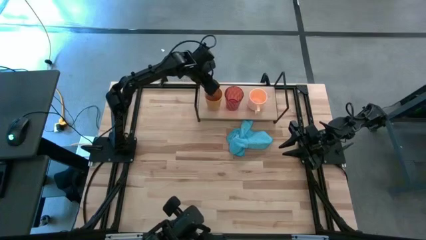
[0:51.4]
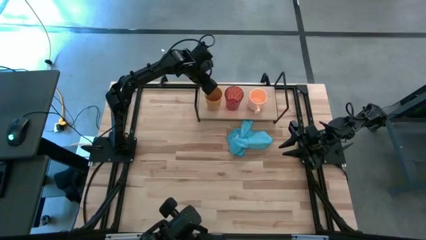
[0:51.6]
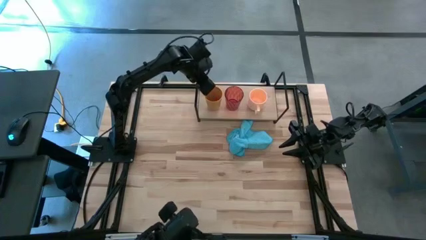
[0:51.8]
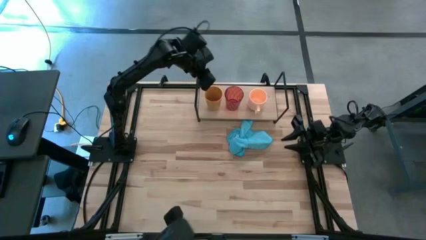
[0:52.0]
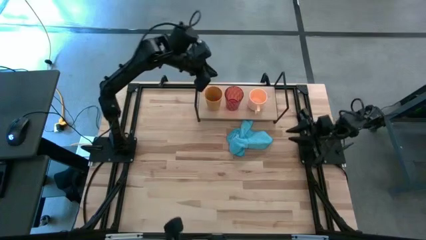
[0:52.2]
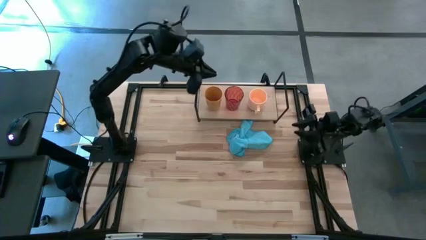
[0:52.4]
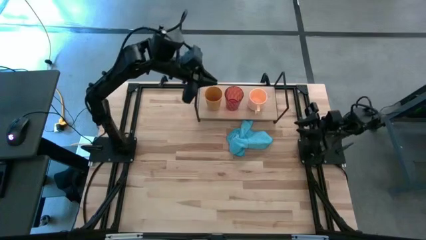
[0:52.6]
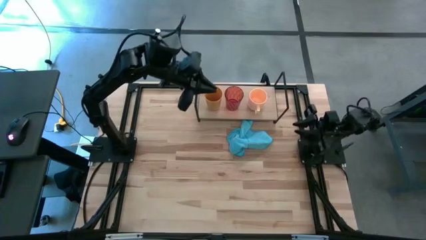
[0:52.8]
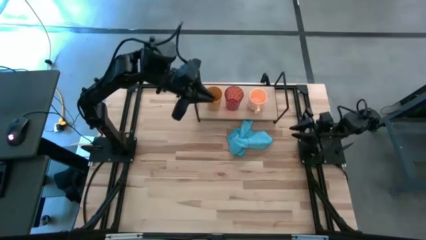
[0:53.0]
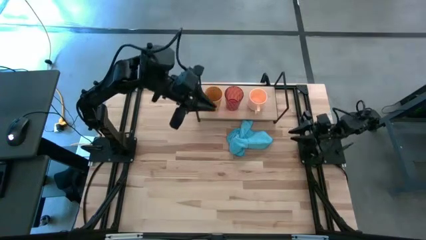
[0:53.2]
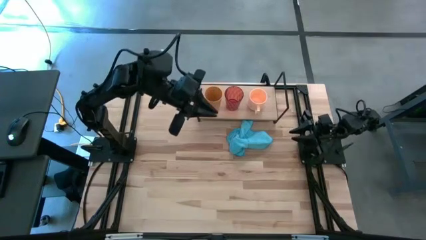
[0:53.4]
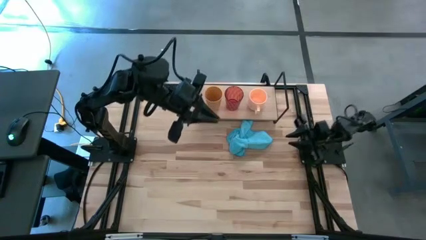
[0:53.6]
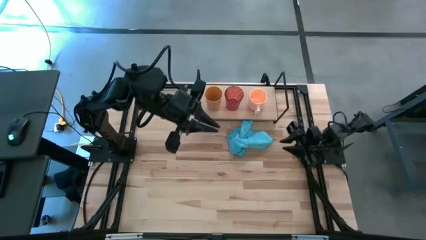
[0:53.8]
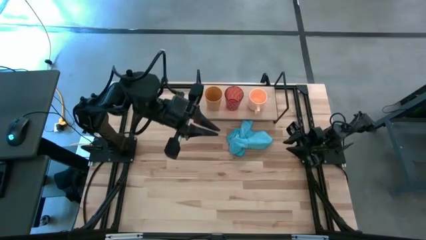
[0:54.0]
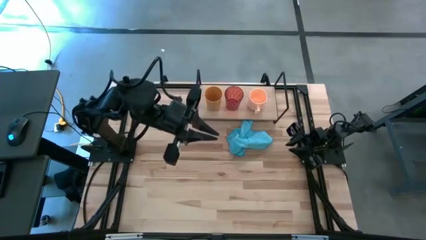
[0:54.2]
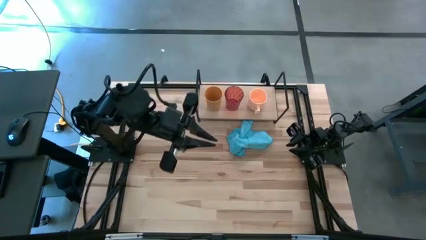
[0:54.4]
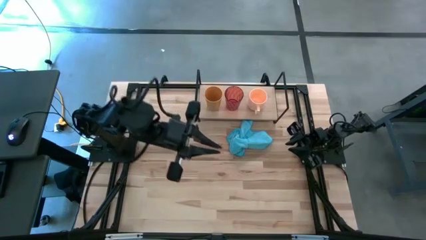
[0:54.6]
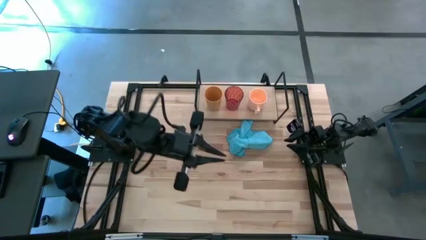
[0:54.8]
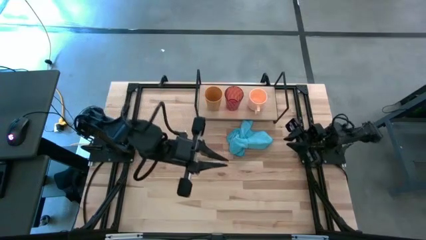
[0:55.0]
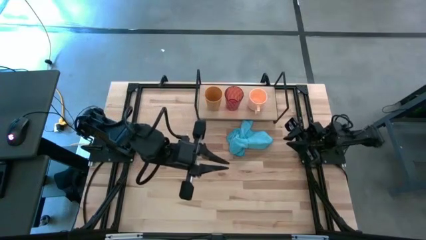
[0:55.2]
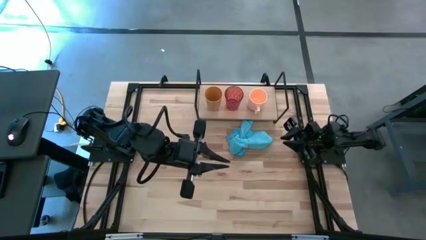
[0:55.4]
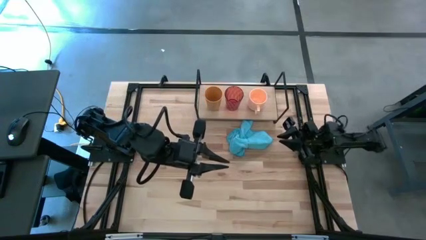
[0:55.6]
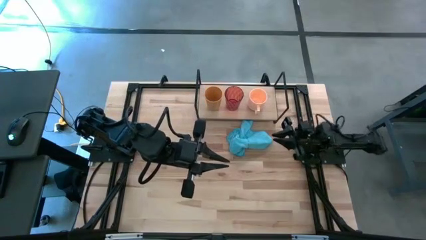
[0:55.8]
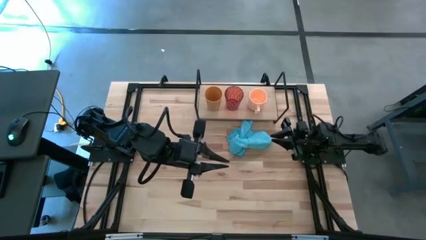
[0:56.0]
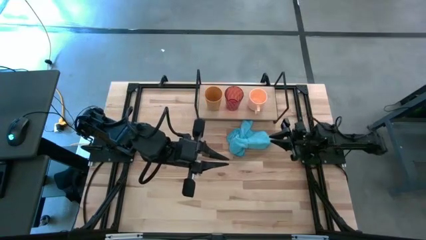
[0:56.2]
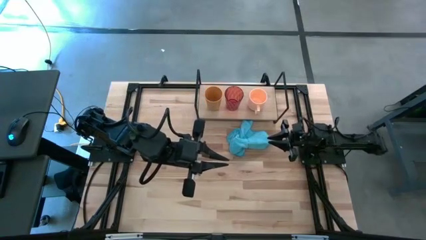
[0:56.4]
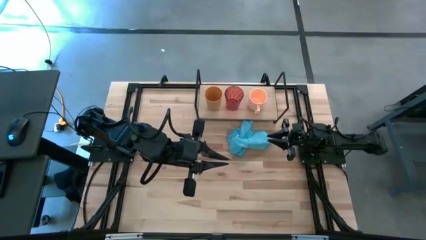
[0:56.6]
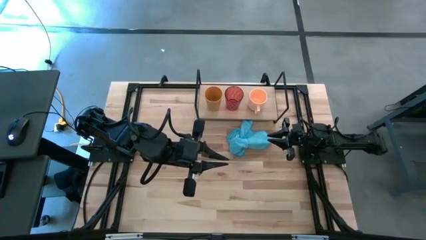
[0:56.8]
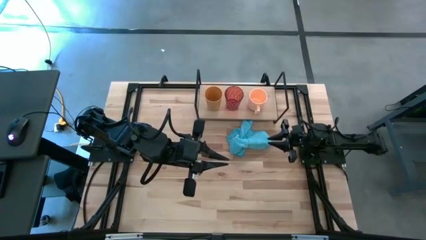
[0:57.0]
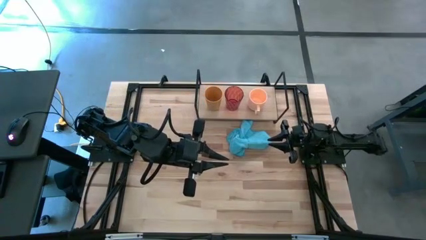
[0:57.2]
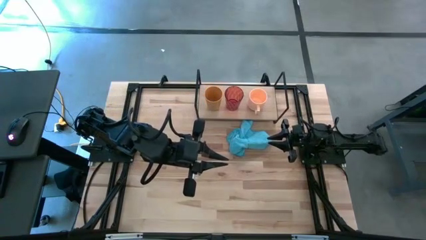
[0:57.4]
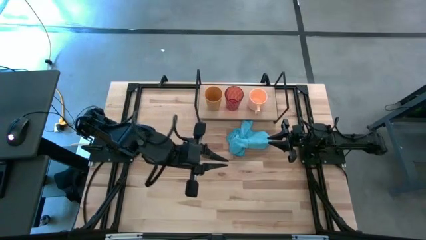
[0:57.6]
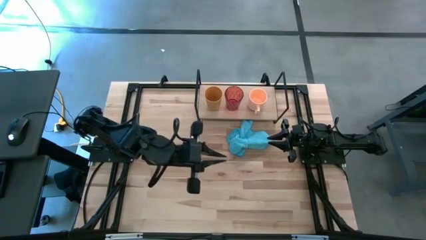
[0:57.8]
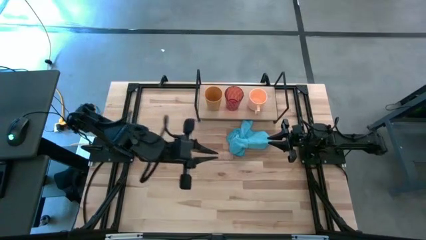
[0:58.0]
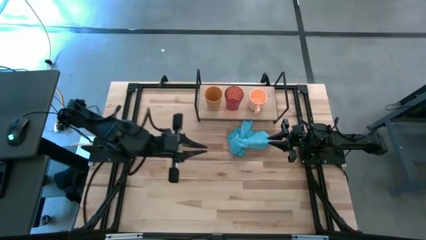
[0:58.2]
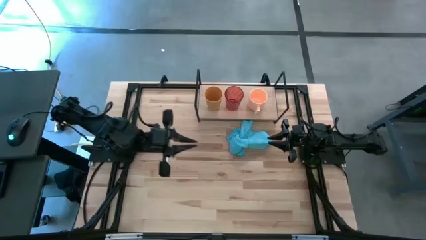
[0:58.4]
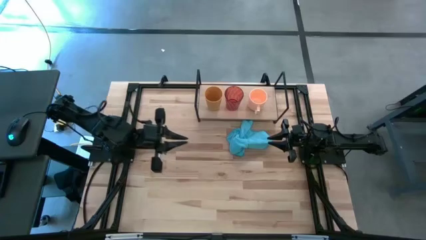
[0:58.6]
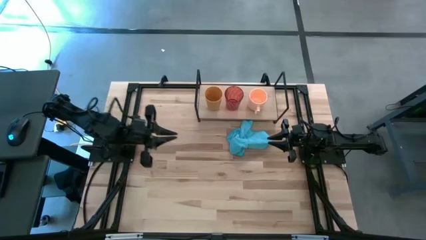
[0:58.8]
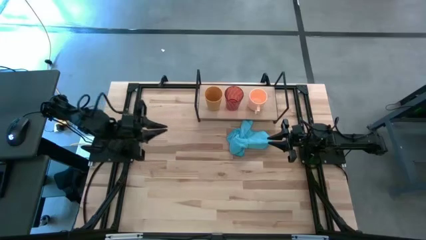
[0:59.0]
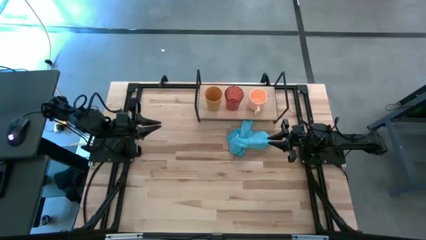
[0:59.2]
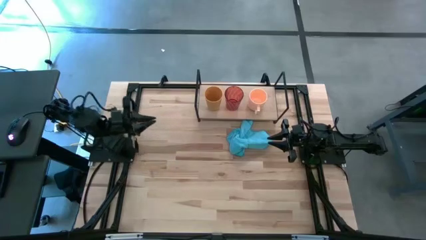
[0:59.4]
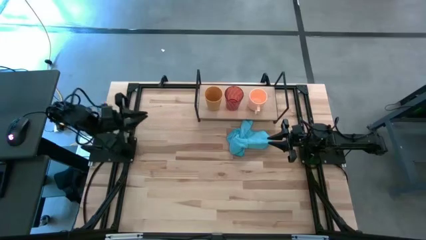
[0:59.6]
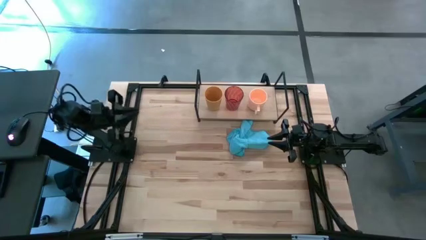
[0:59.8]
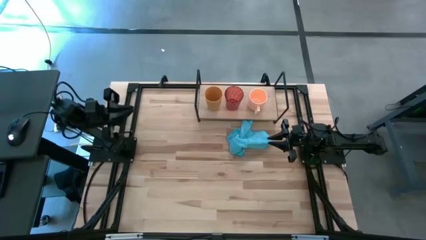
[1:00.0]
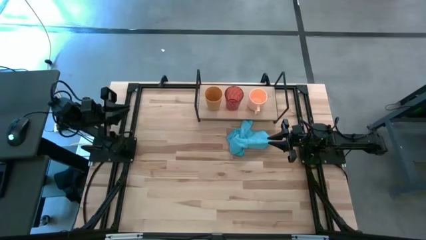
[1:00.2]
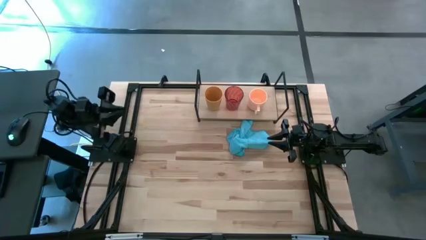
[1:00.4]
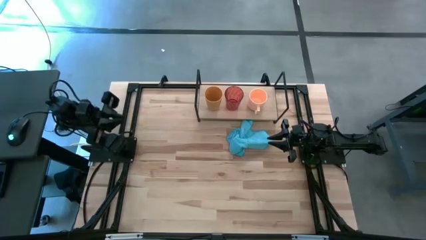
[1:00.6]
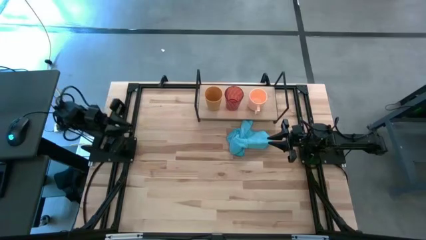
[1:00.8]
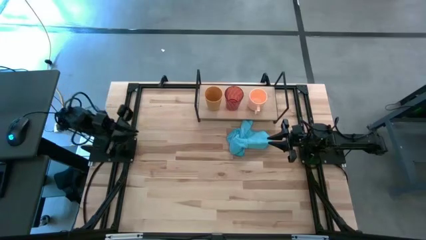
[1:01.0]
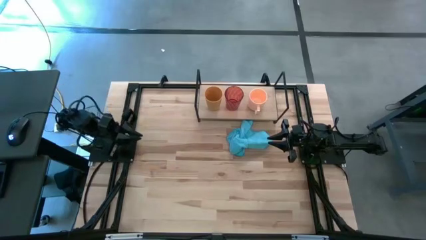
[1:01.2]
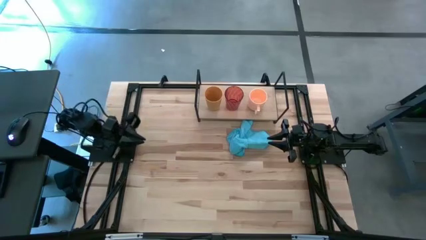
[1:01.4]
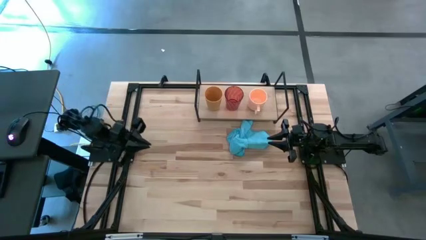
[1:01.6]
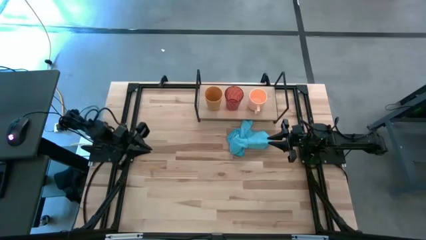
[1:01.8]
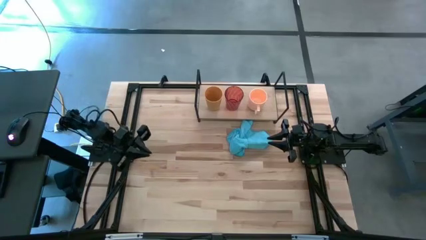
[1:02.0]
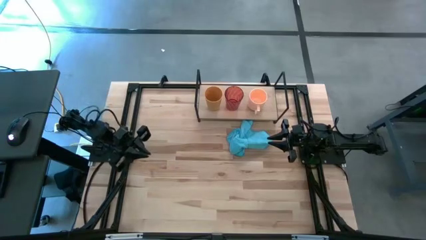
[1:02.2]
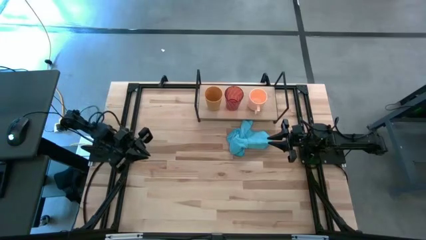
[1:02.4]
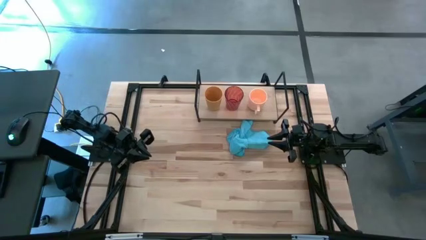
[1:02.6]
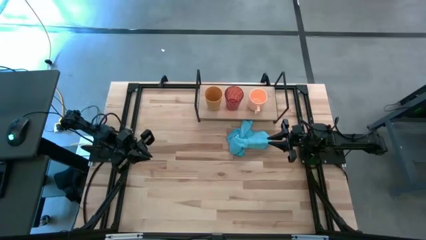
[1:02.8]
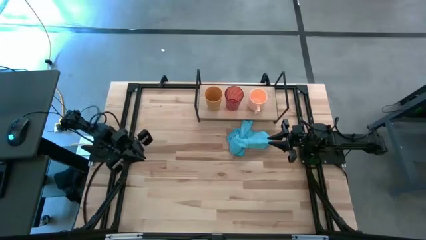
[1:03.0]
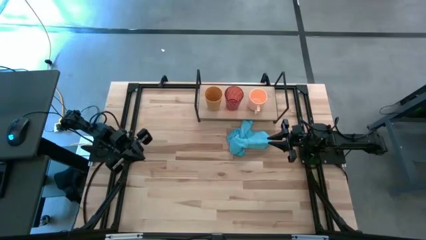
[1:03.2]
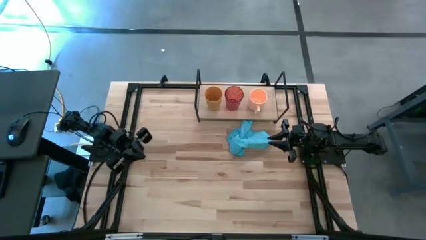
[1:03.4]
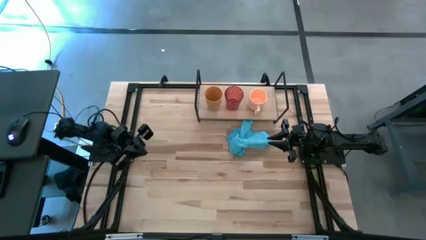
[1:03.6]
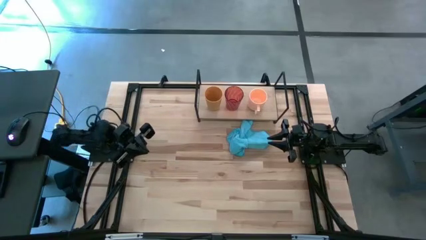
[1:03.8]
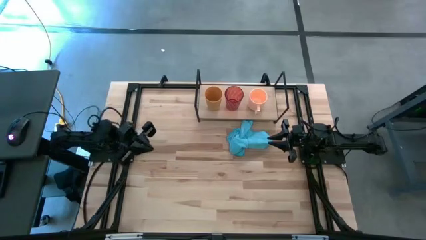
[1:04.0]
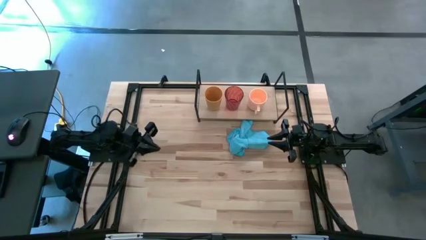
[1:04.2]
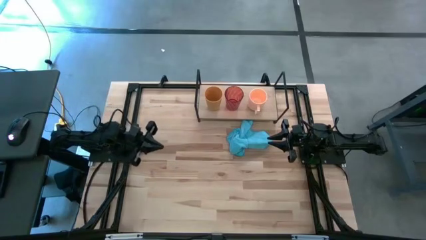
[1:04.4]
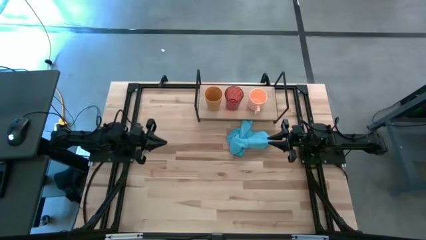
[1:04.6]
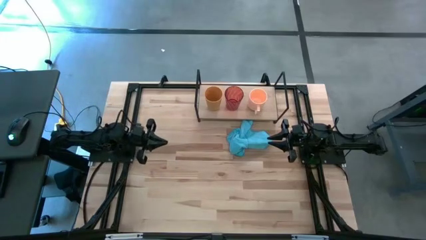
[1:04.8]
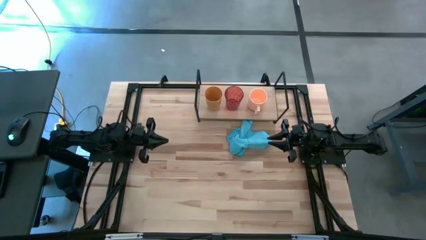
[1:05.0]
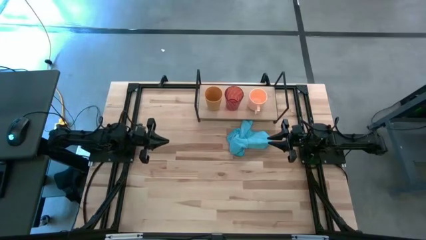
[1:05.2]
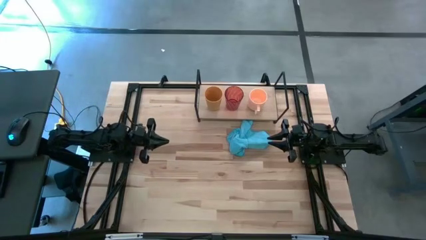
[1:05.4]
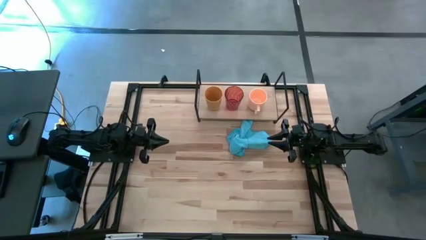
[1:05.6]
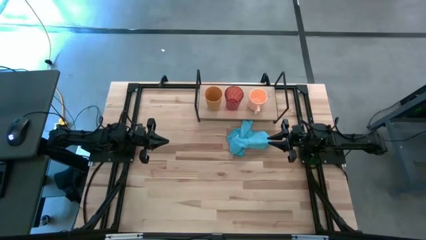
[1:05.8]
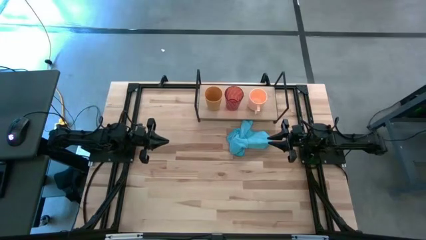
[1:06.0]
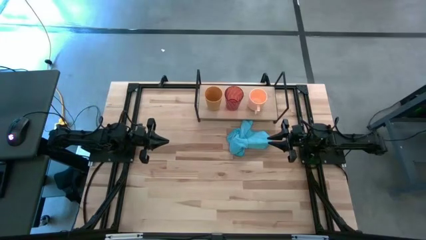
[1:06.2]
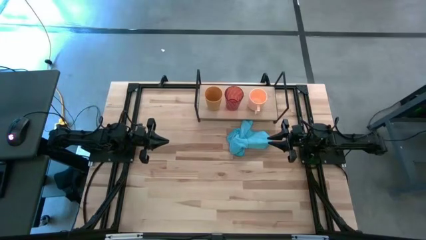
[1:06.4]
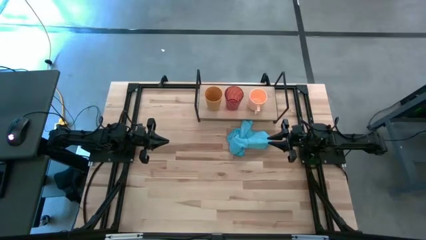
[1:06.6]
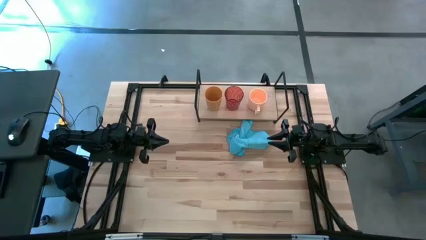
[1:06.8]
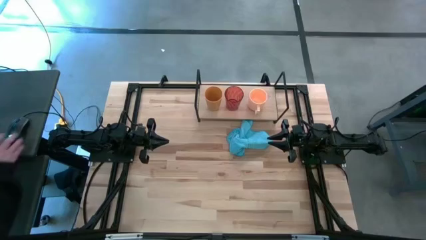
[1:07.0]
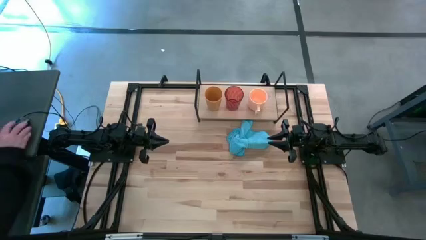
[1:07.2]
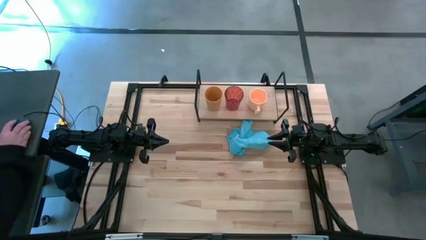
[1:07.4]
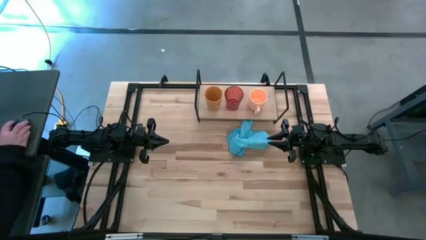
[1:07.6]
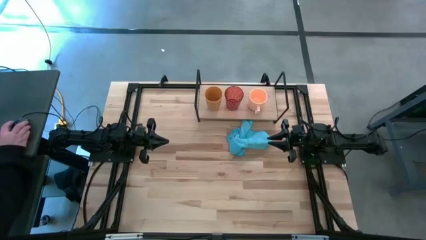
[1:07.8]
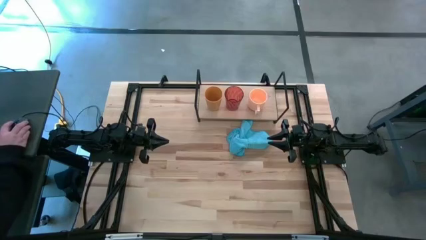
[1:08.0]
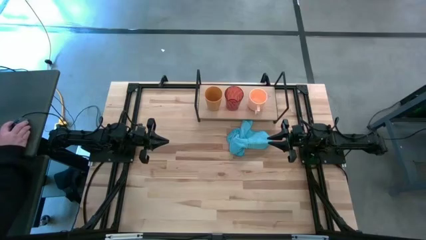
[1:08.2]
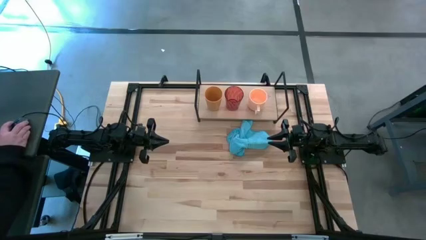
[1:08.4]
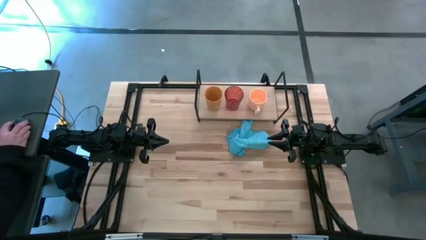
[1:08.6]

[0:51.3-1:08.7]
Task: Stack small to large cups/mugs on shelf
Return to Home Position
